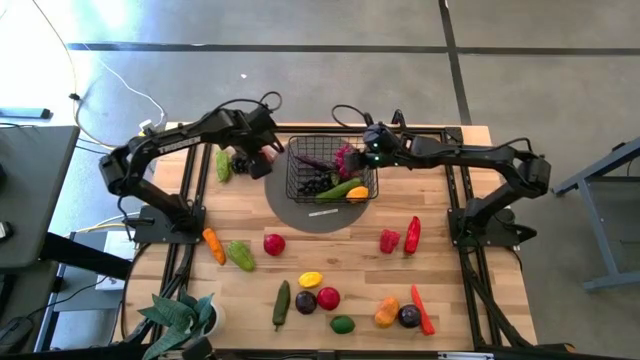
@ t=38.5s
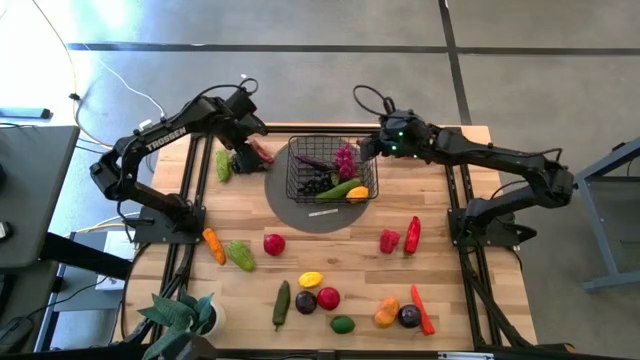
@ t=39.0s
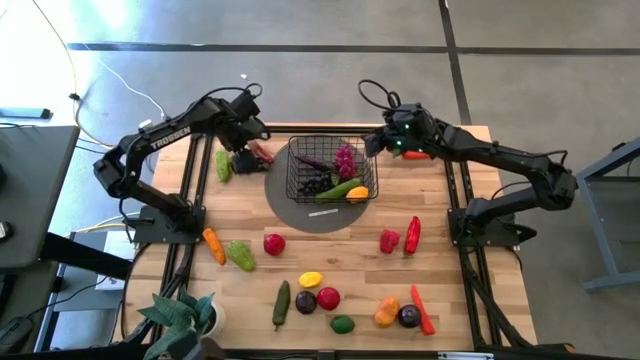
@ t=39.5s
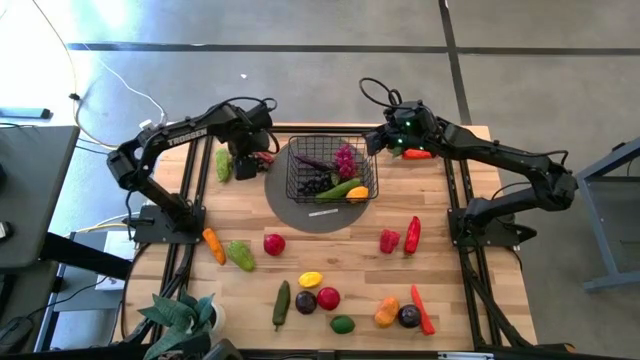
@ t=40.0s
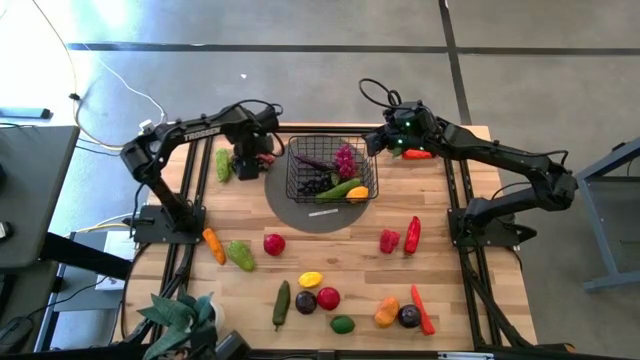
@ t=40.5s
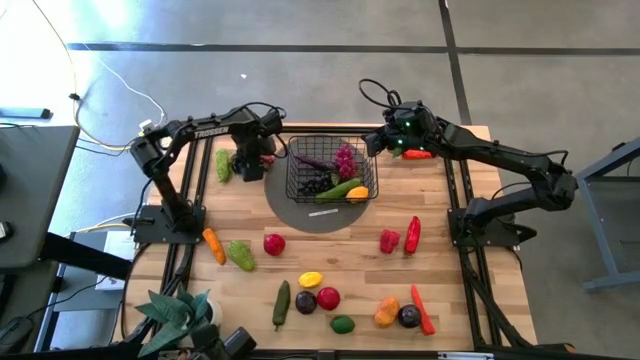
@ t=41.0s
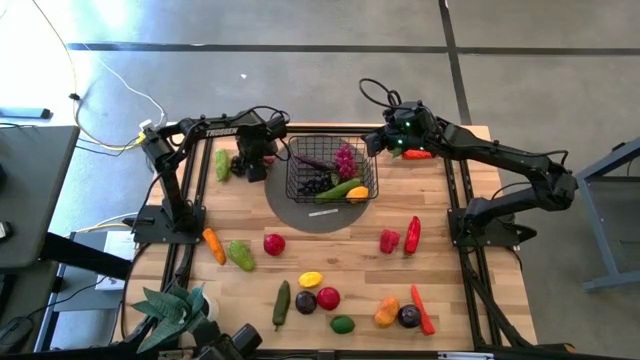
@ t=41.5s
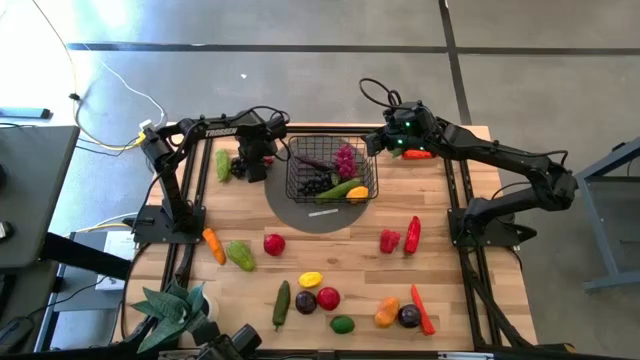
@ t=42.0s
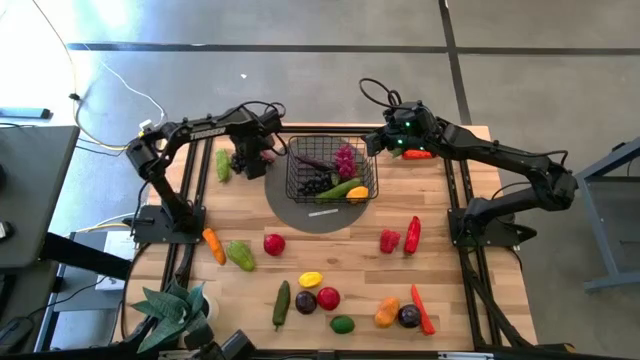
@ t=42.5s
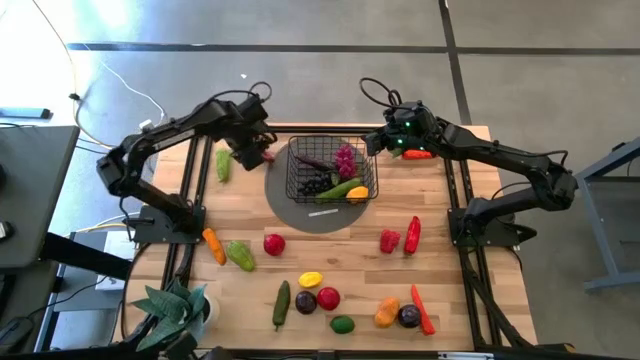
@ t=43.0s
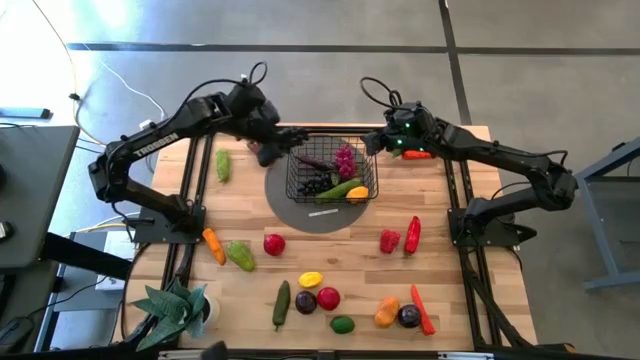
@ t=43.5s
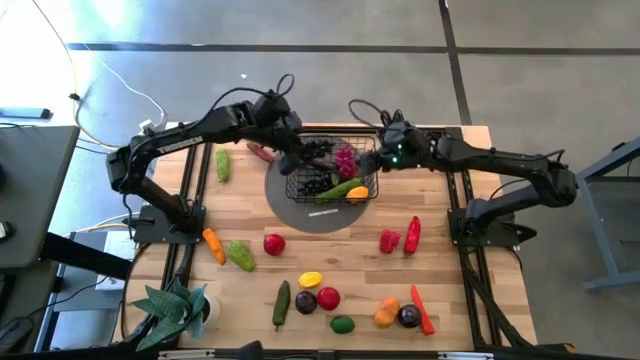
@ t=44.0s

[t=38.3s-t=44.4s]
Task: Build produce basket
Put the black grapes into the black mesh basket

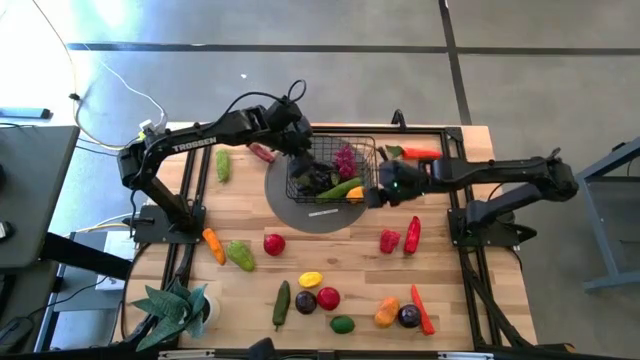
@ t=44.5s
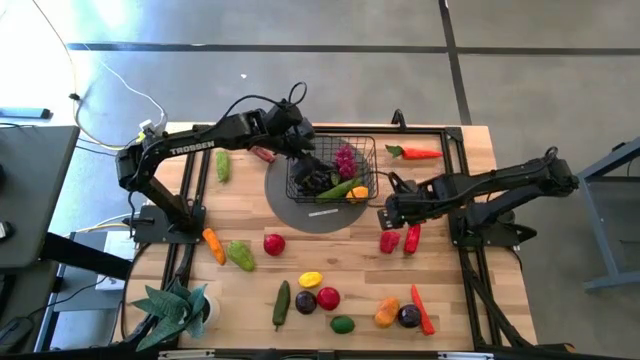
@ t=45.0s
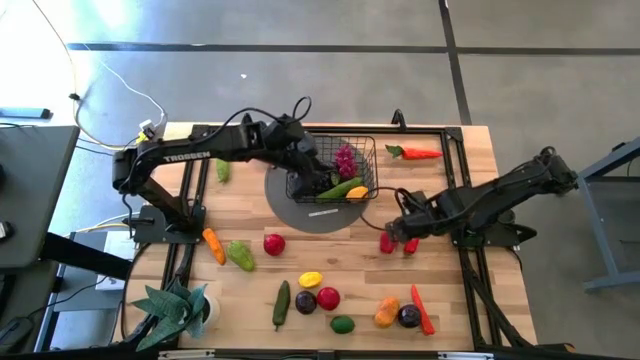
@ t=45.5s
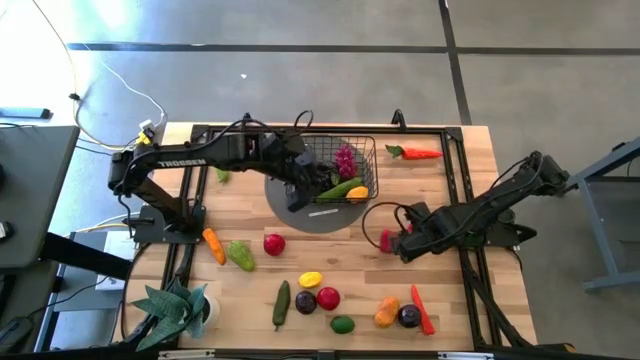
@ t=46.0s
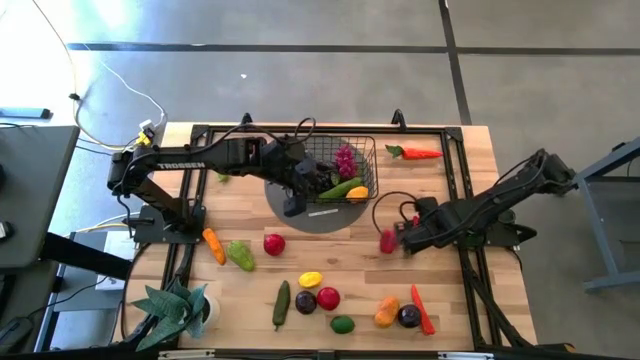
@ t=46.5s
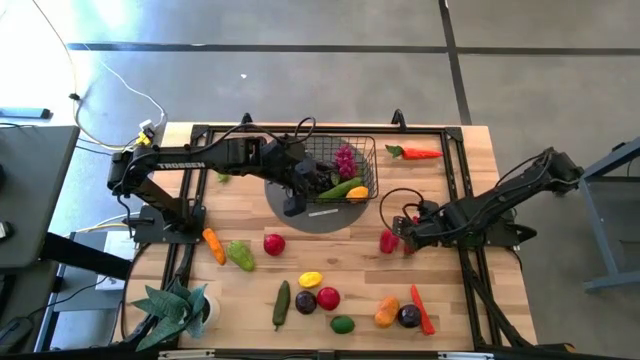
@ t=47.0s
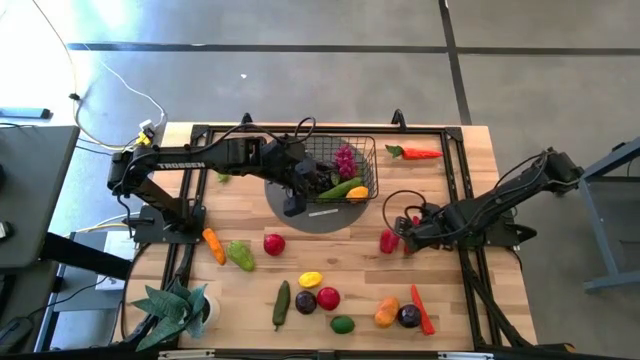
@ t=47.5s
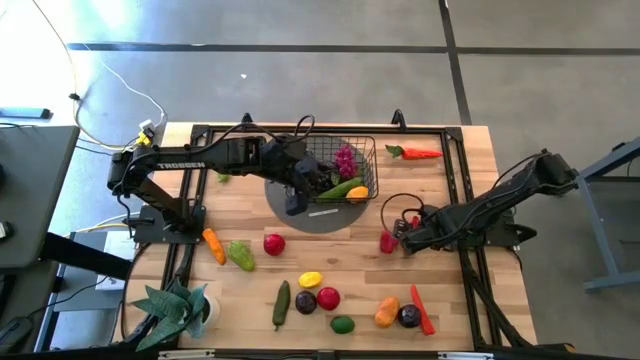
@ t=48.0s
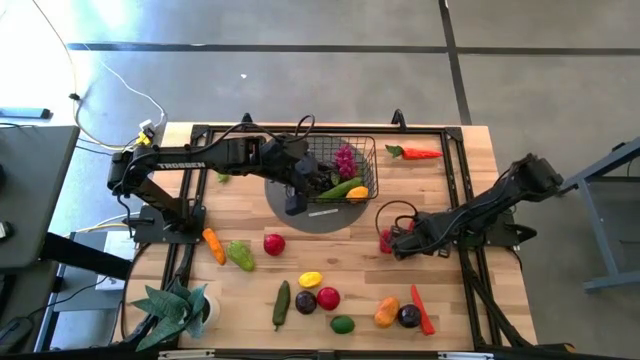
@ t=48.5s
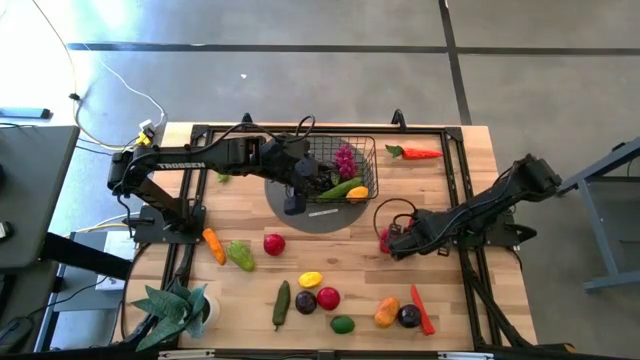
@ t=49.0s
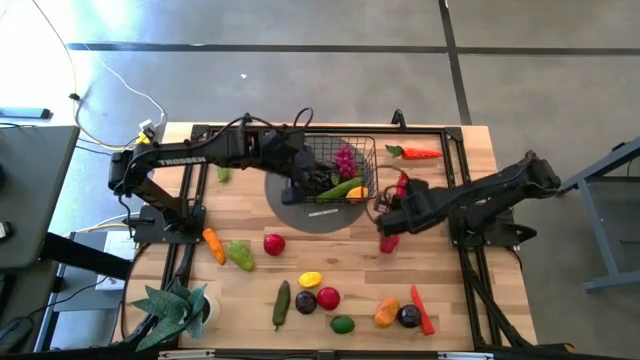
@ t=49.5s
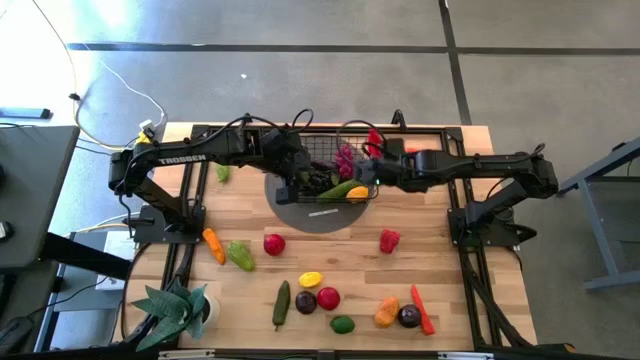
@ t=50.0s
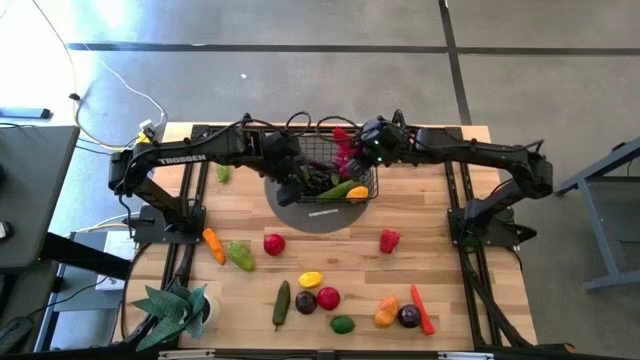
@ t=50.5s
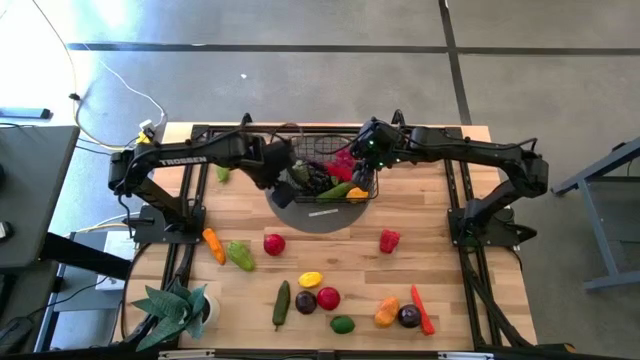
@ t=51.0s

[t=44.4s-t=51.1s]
Put the bottom red chili pepper into the black mesh basket

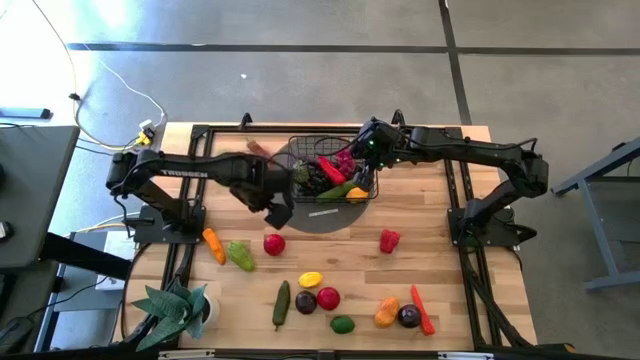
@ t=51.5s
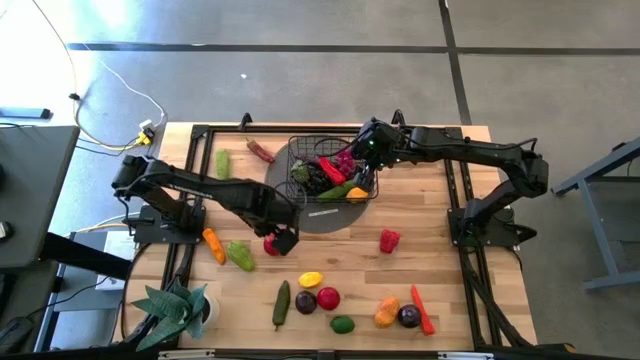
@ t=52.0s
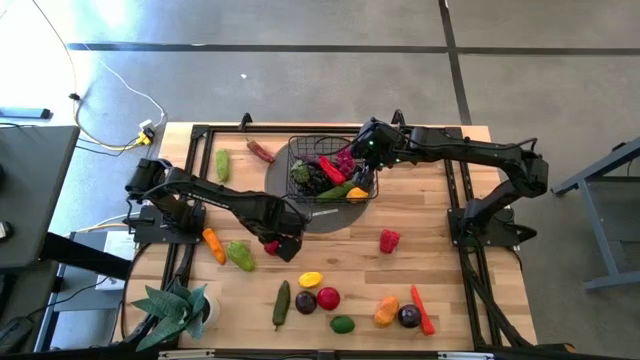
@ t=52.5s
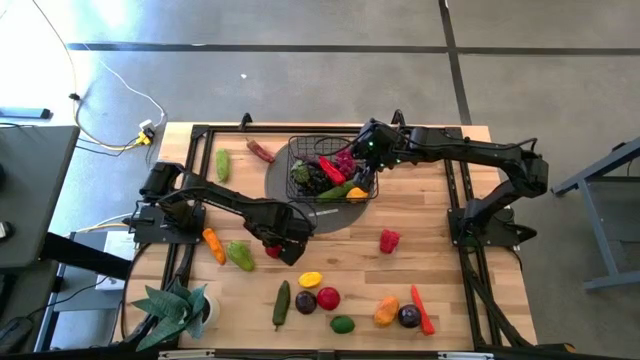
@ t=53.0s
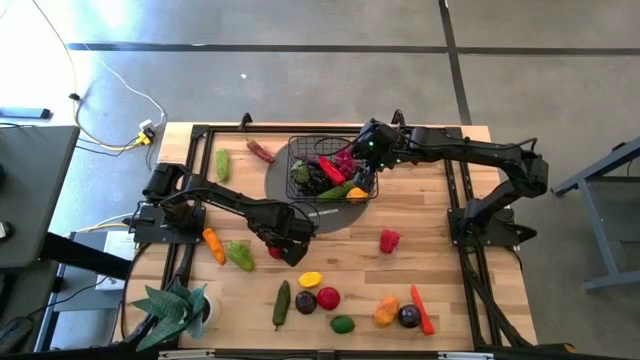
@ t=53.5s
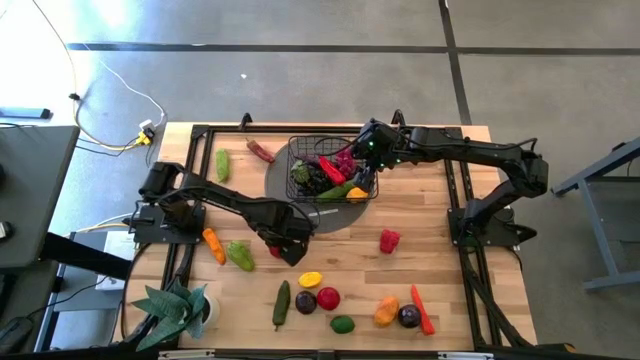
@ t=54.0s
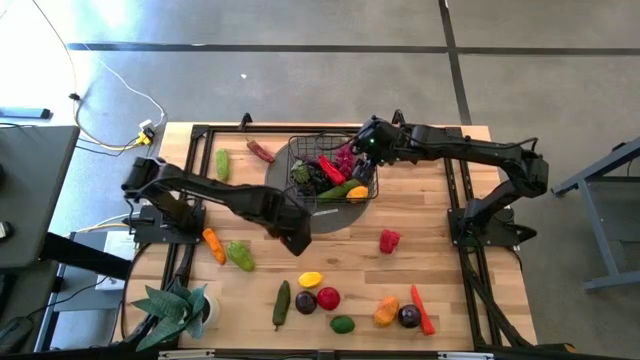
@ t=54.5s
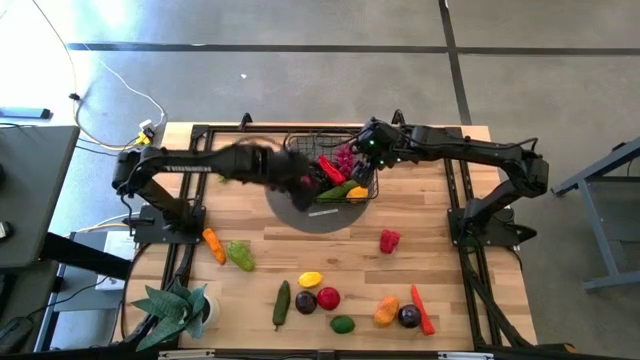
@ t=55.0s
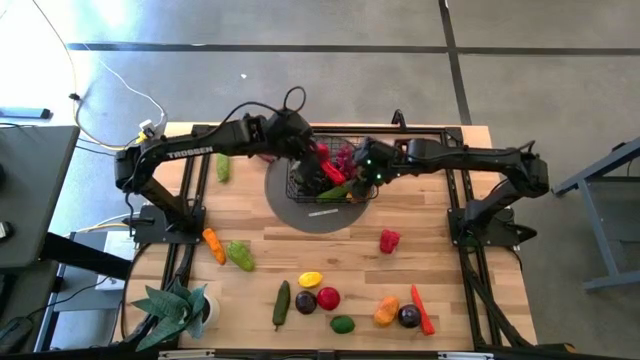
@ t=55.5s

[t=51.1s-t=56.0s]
Put the top red tomato into the black mesh basket

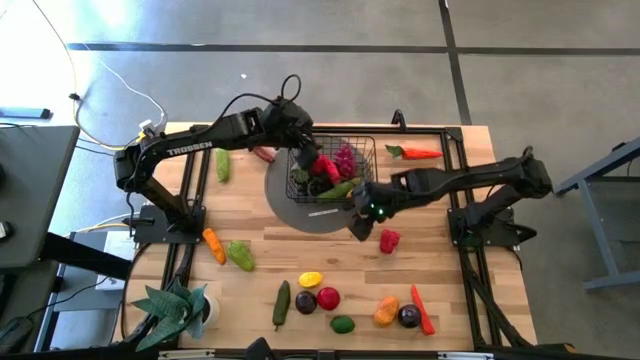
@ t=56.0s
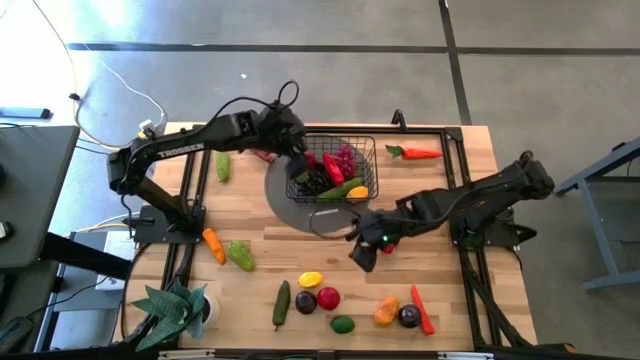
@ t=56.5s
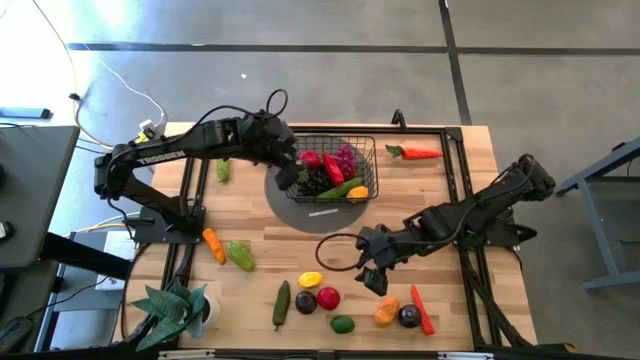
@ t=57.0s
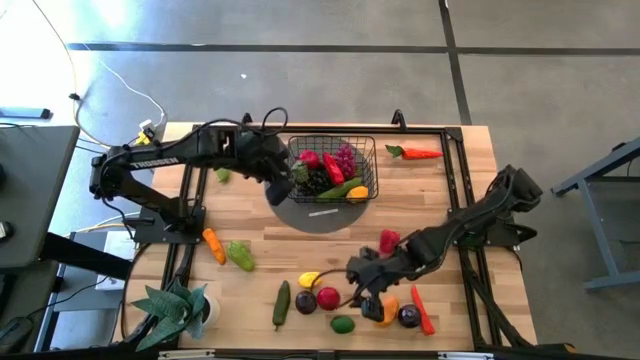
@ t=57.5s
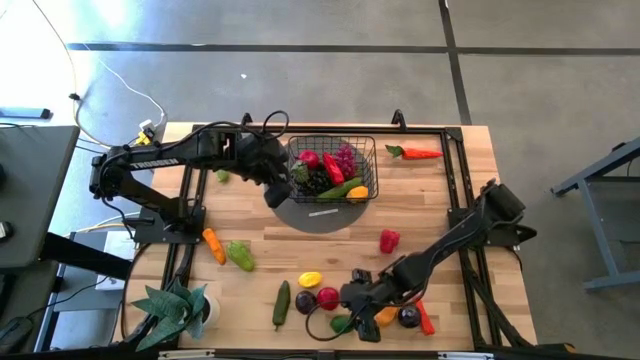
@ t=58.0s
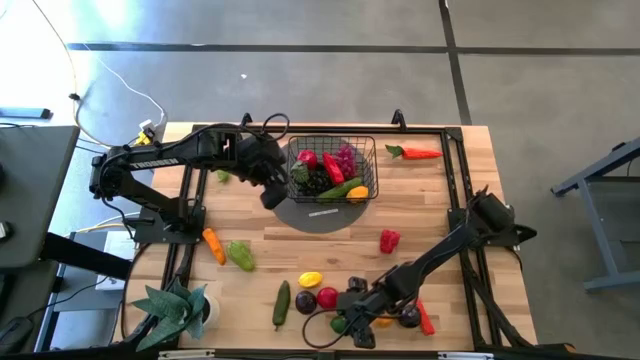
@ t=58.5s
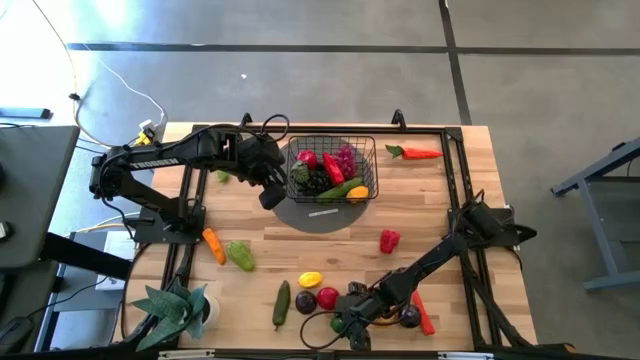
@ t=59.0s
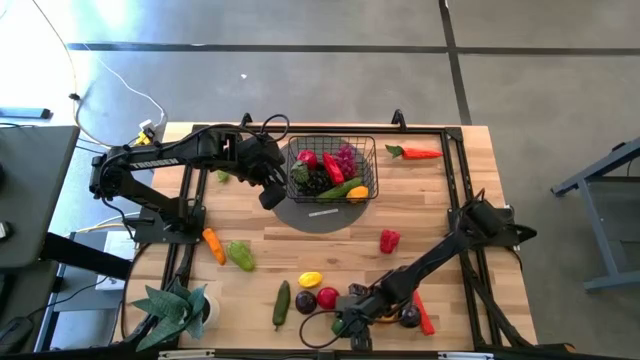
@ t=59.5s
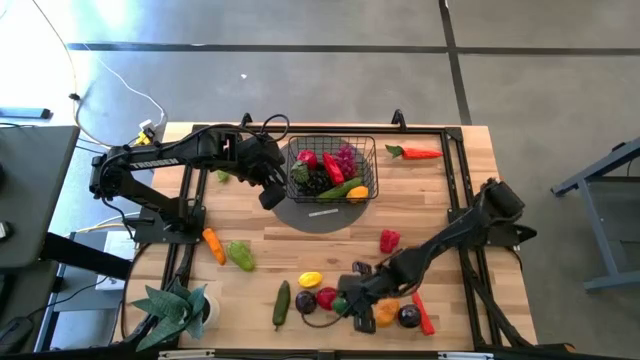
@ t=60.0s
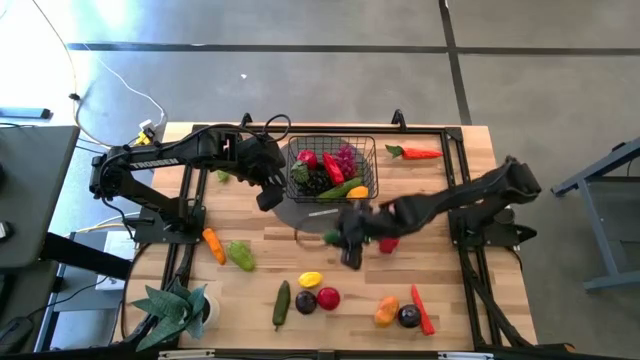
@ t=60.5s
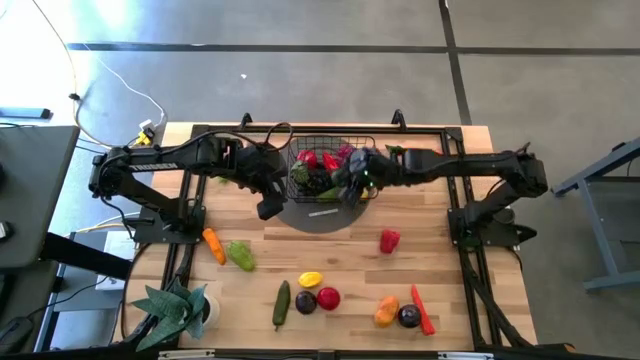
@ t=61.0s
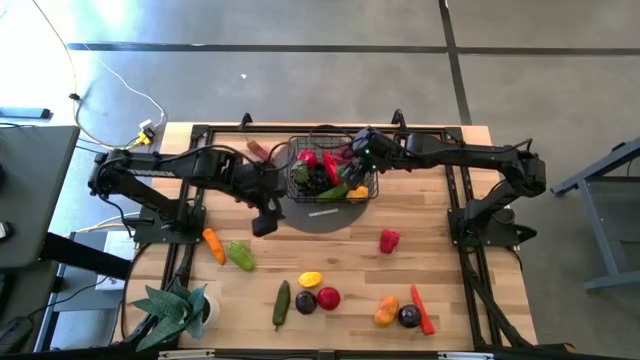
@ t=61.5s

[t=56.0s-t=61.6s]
Put the green lime into the black mesh basket
